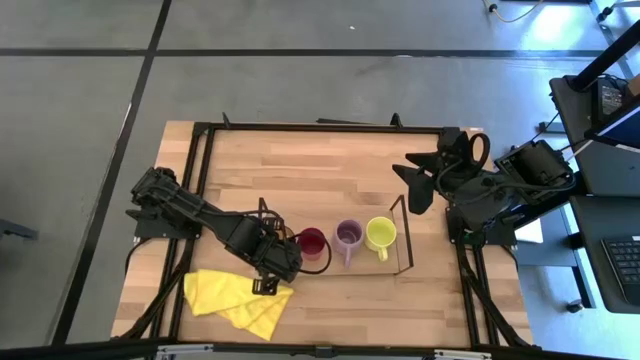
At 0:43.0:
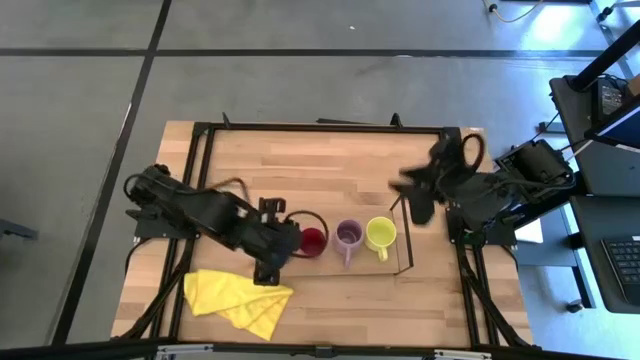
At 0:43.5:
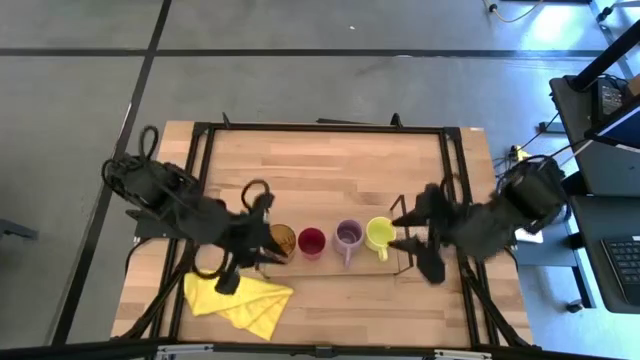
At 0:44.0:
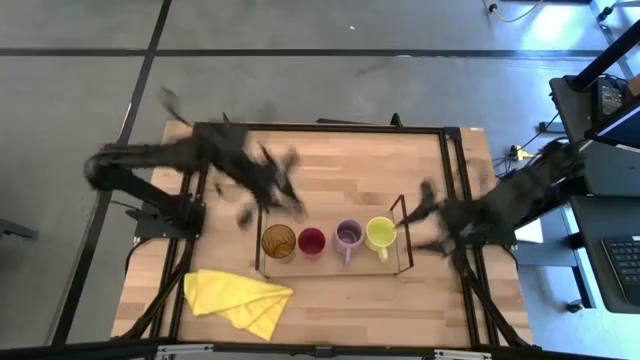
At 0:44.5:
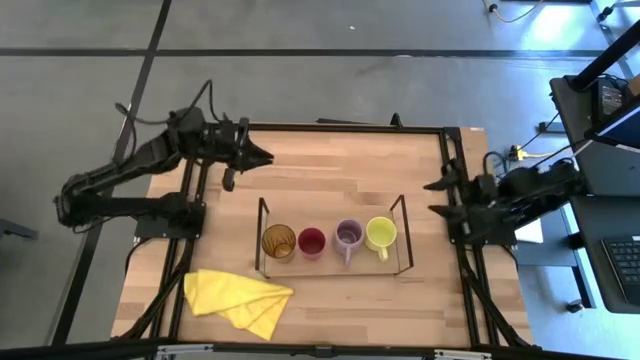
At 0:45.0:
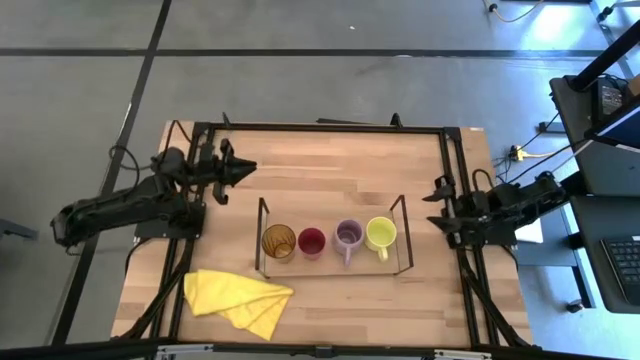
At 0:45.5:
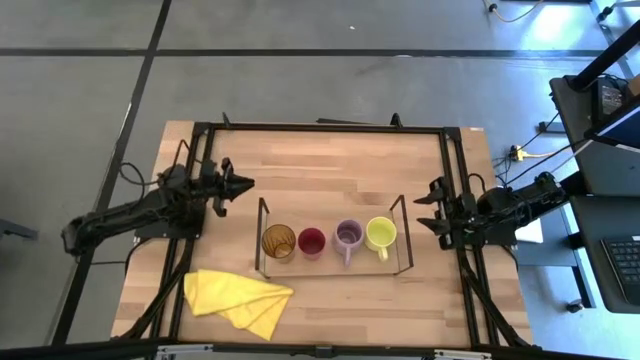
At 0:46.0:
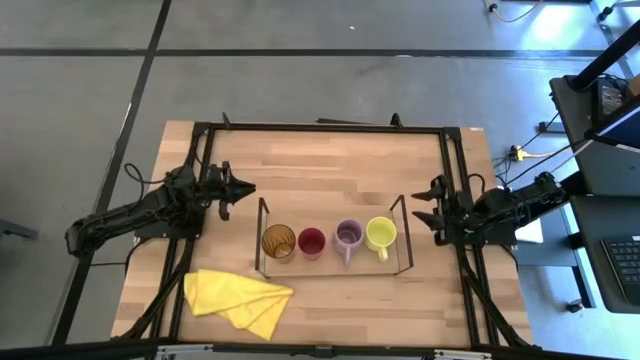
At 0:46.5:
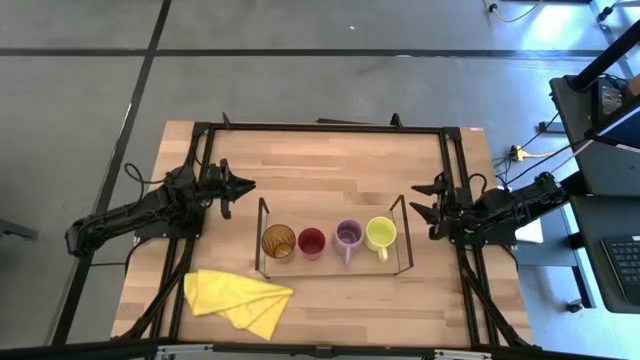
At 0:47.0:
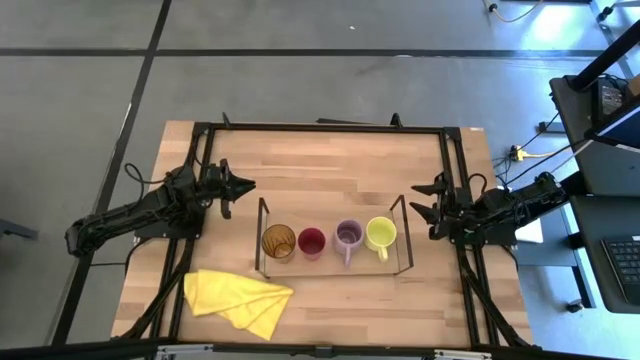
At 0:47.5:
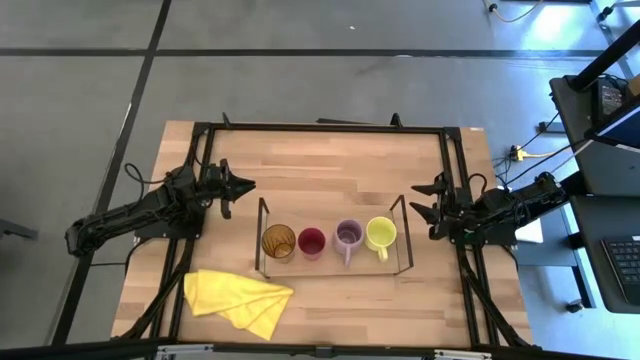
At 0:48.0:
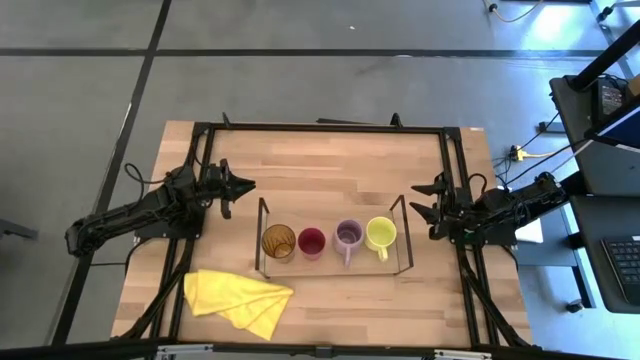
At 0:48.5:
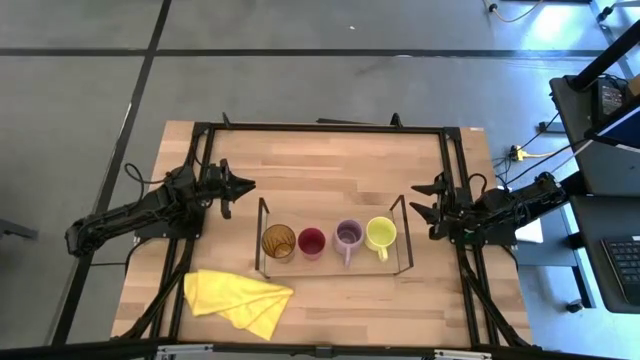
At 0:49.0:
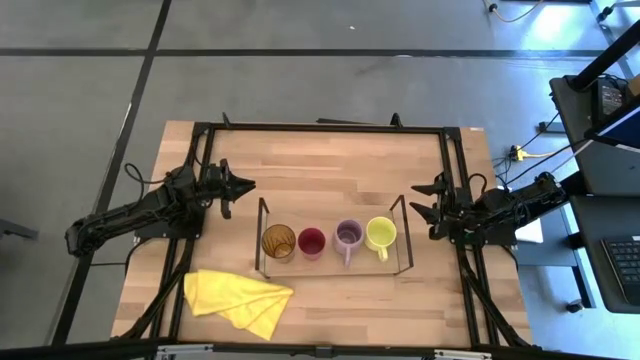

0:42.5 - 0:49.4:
Task: Stack small to large cups/mugs on shelf
Return to Home Position

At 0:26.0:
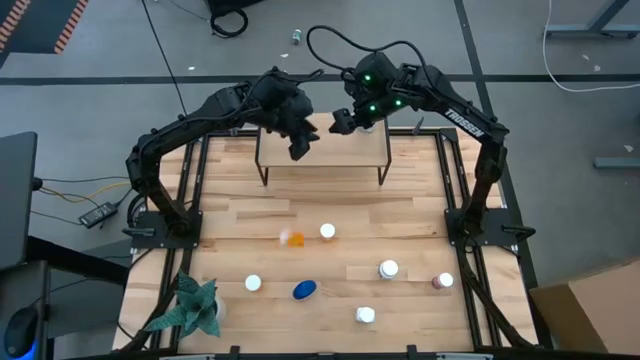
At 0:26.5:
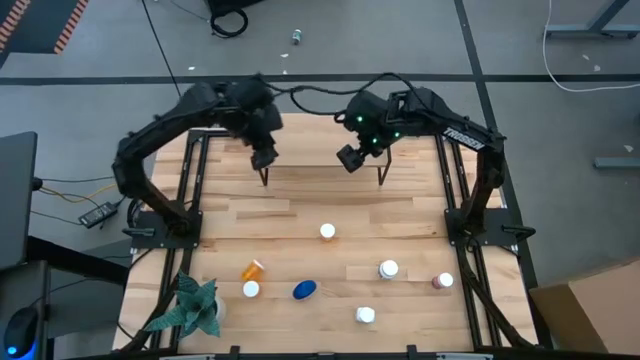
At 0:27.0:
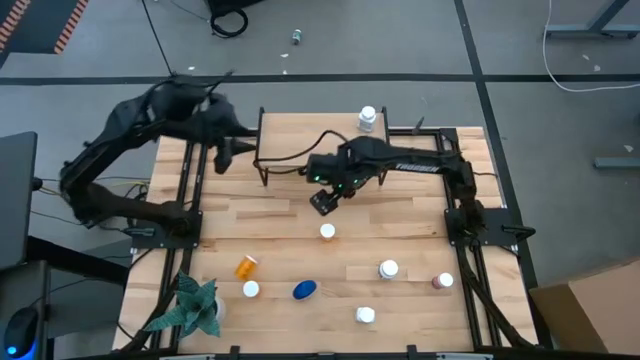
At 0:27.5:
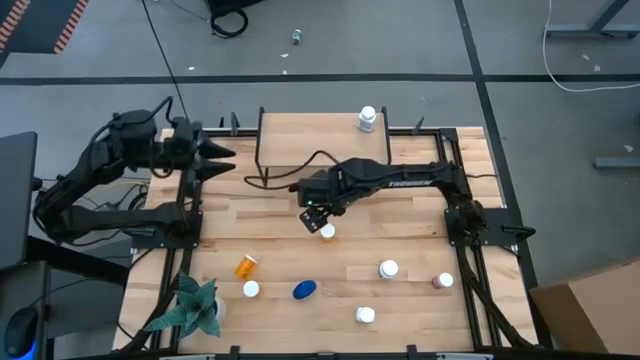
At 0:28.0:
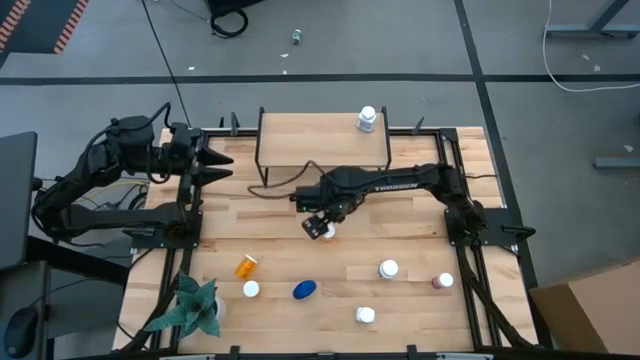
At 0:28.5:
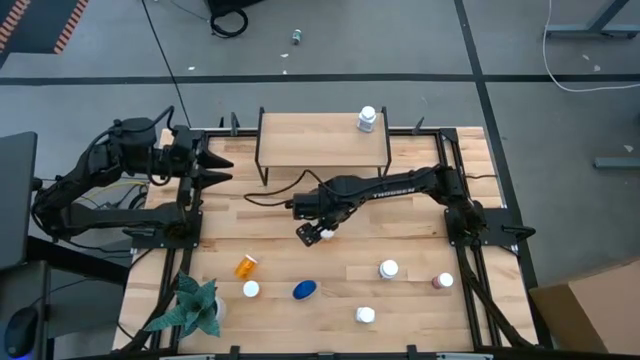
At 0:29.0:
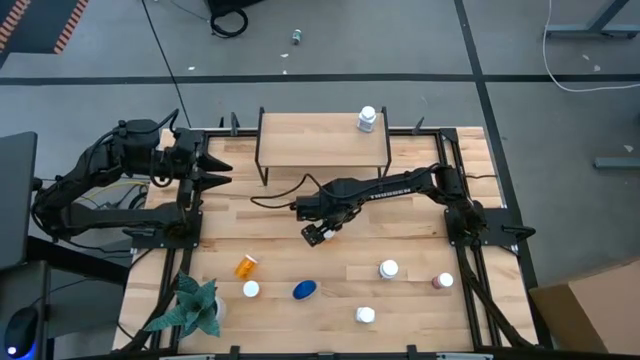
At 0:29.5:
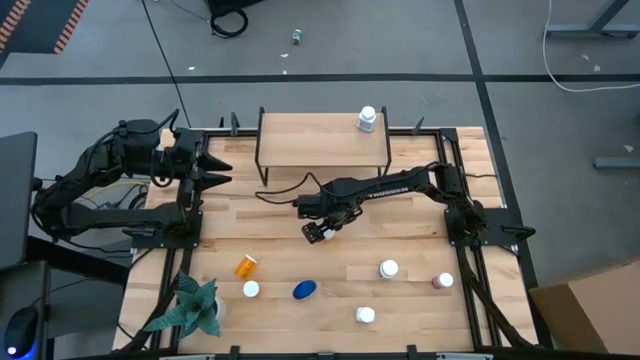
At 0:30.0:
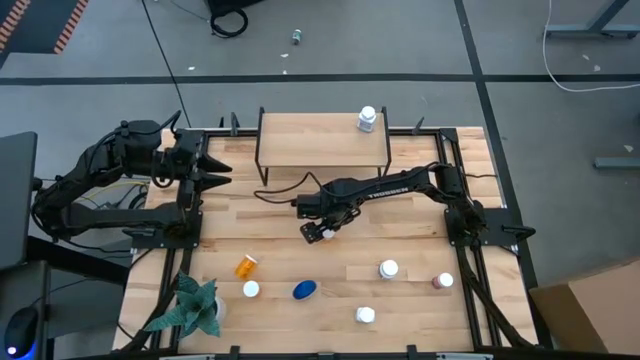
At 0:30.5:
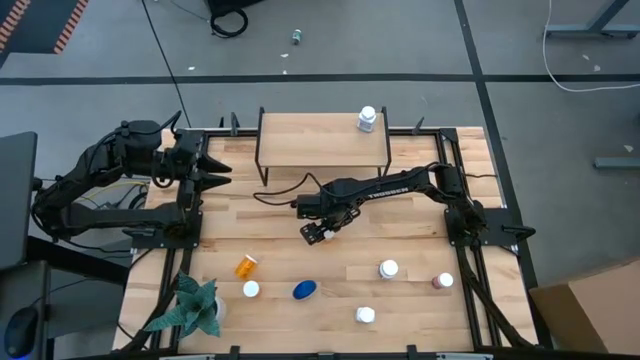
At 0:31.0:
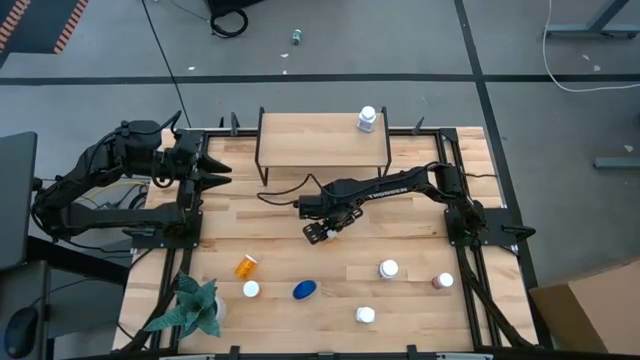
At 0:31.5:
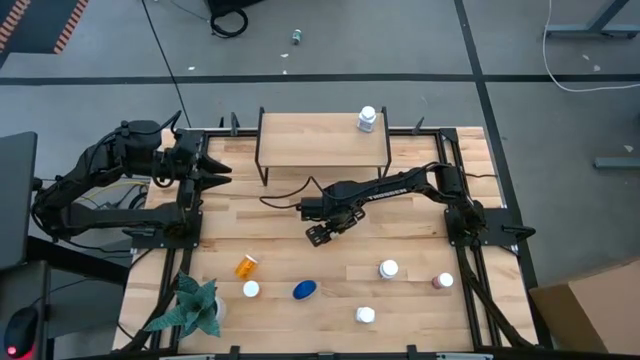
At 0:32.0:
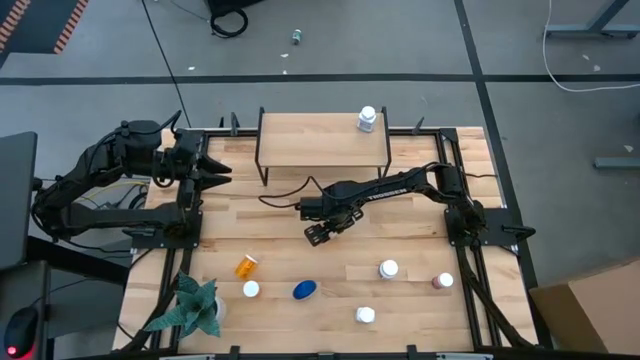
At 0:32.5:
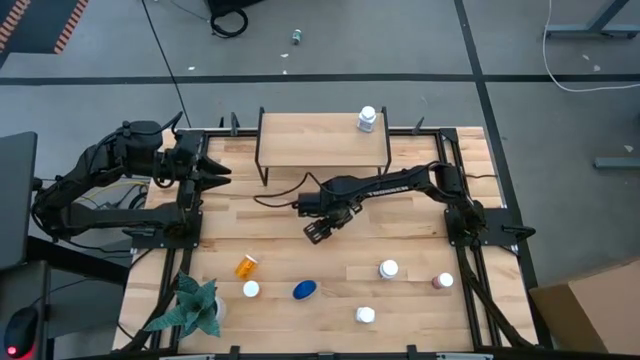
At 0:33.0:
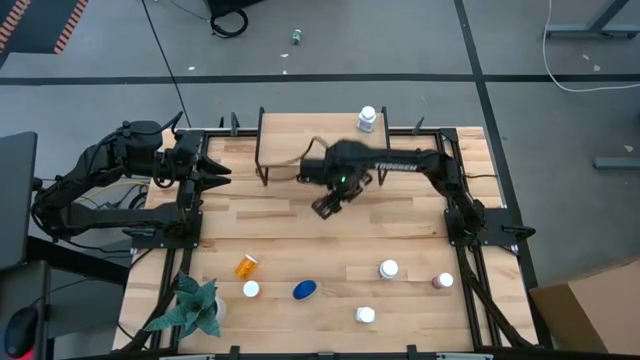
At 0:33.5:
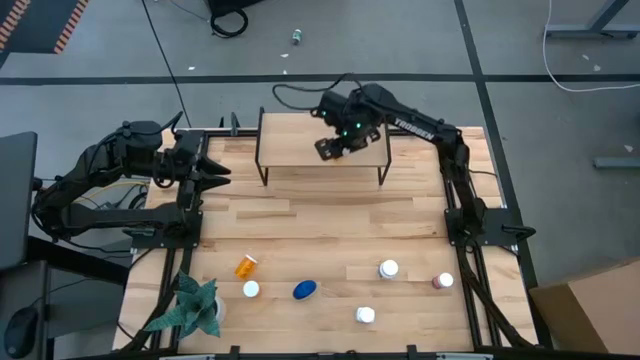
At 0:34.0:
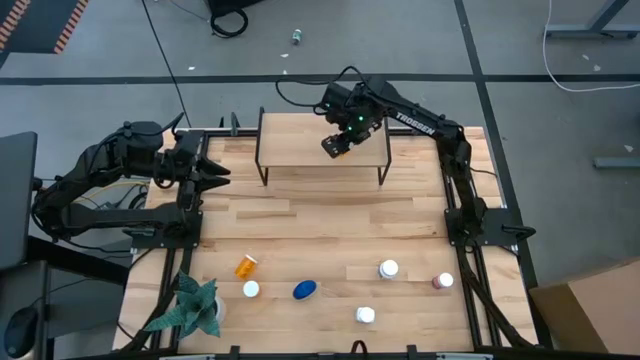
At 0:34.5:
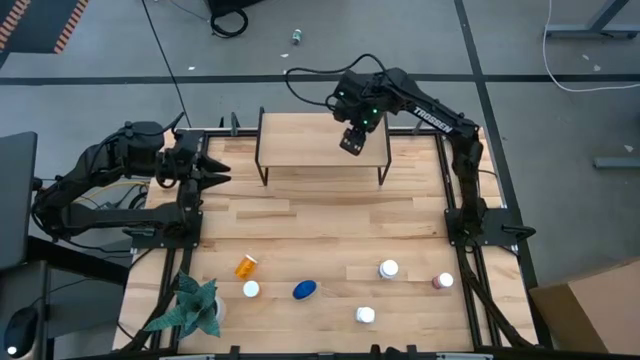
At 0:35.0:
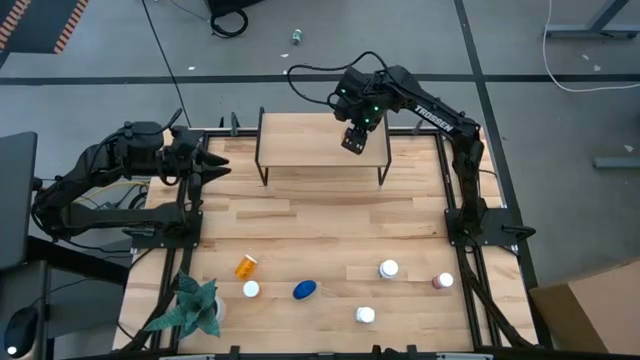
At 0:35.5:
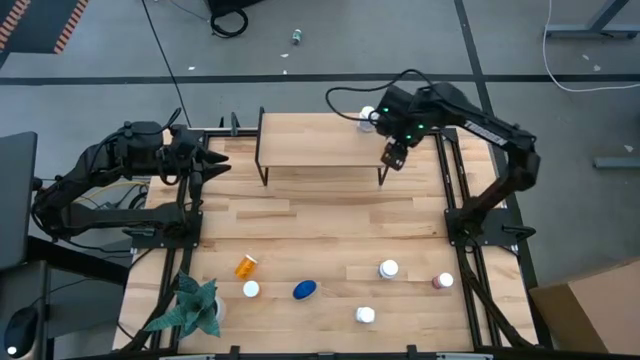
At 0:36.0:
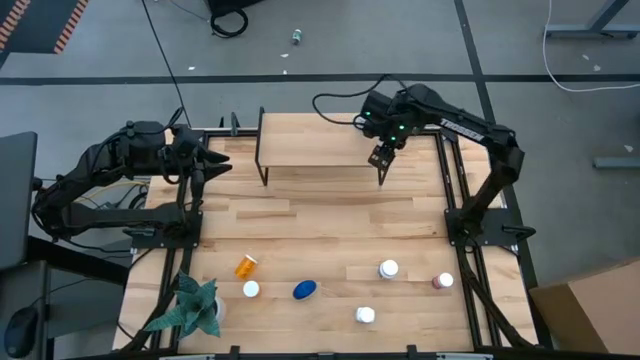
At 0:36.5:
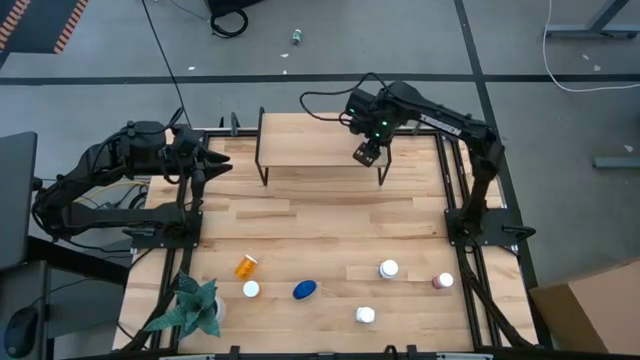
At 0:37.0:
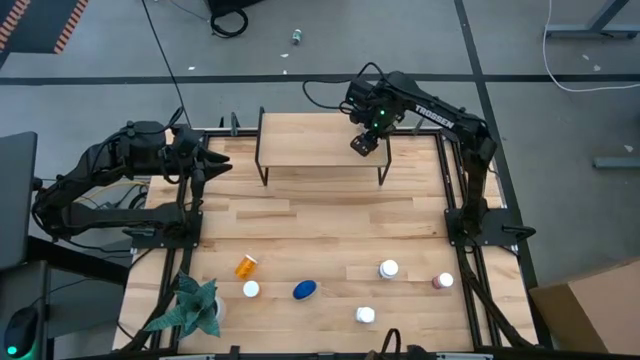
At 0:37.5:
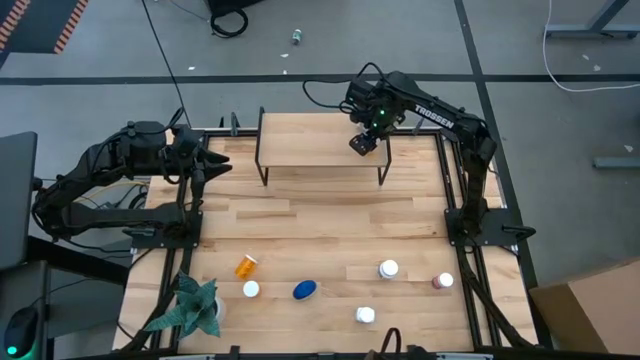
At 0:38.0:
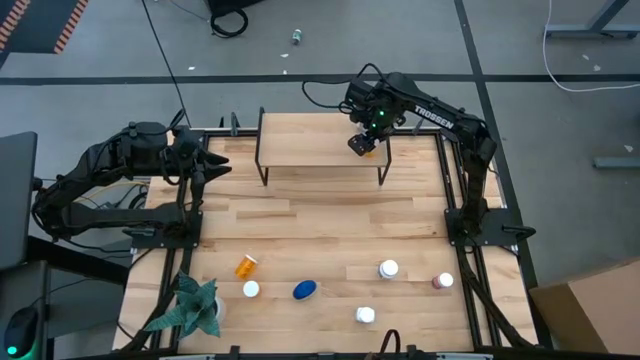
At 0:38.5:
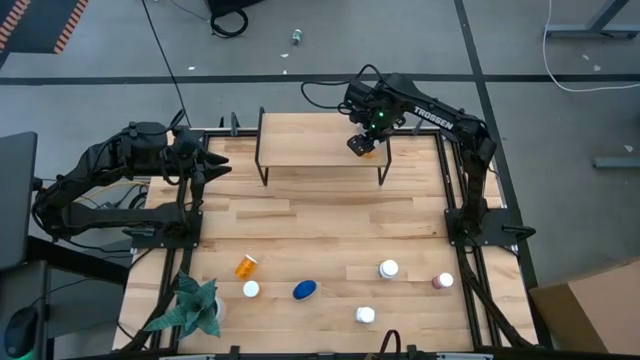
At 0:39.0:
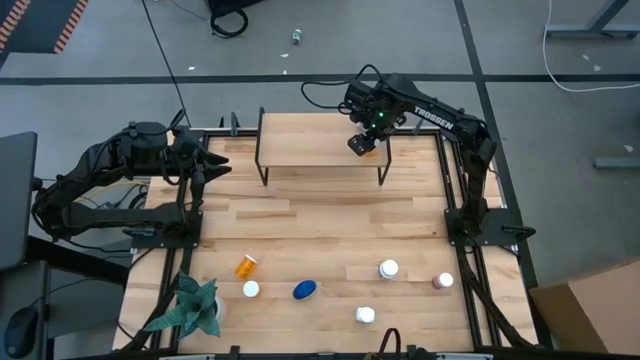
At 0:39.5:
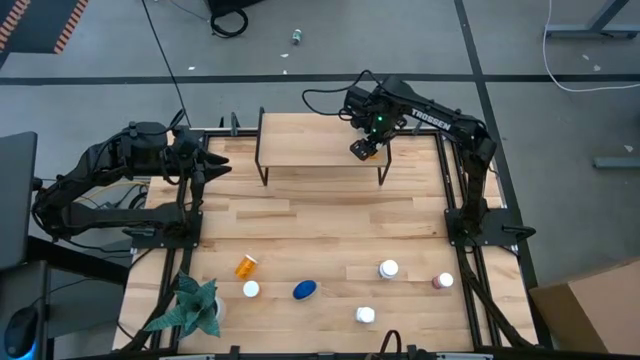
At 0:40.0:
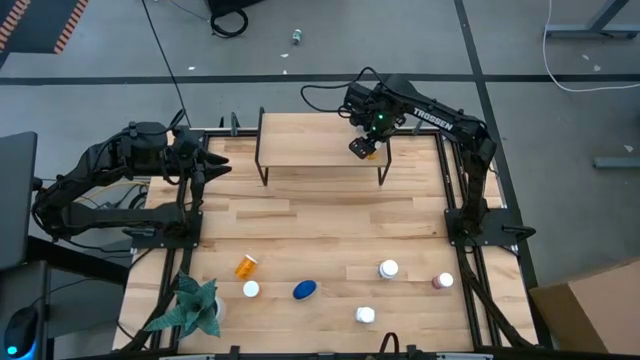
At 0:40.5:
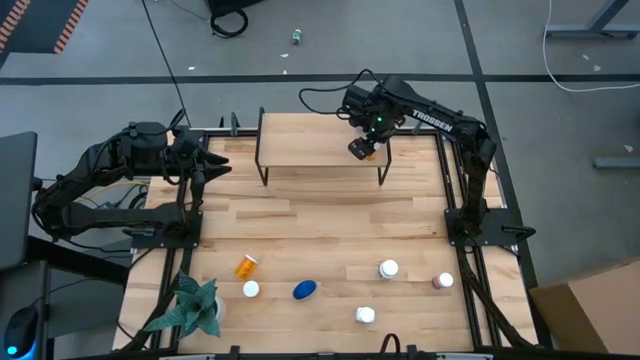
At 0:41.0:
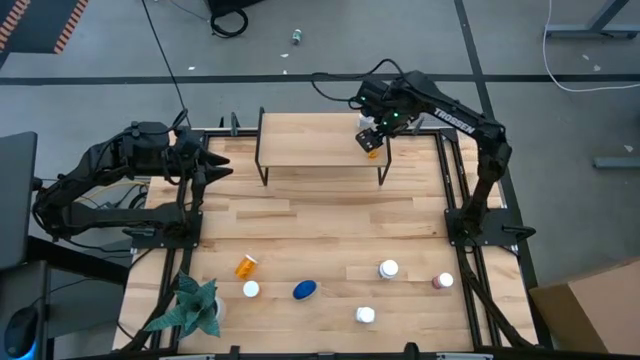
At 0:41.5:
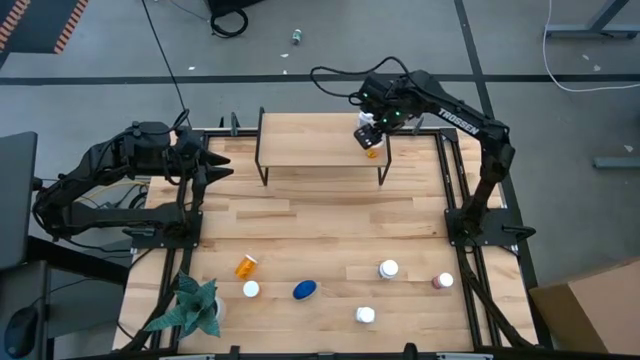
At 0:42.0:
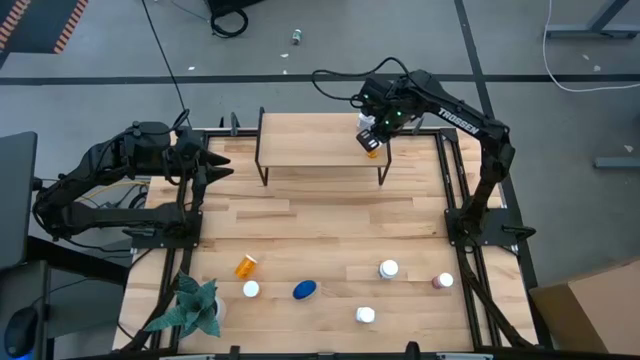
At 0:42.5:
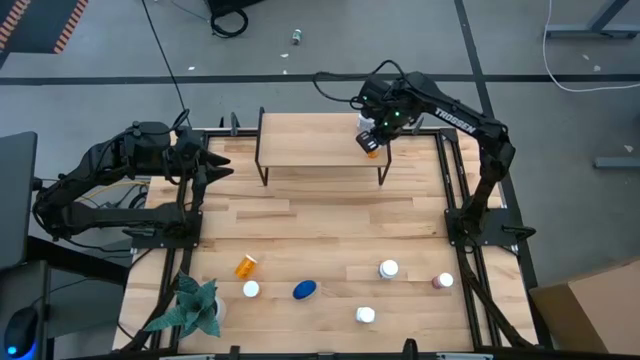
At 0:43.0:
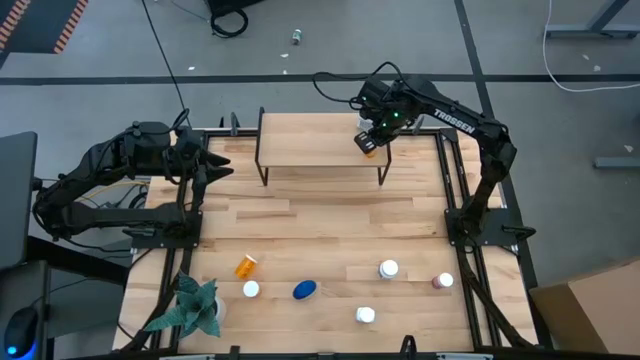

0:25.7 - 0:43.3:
Task: Pick and place medicine bottles onto shelf by color
Put the top orange pill bottle on the shelf
